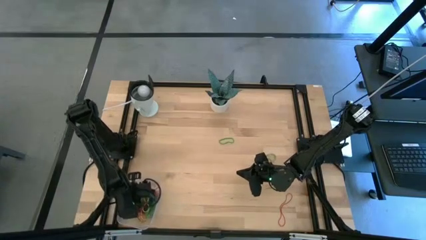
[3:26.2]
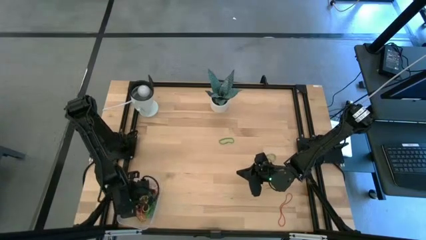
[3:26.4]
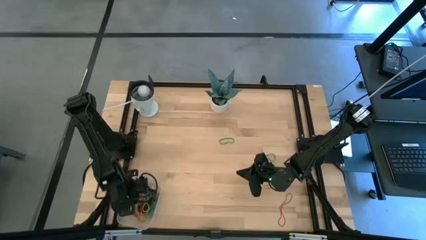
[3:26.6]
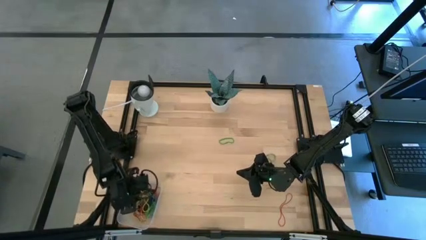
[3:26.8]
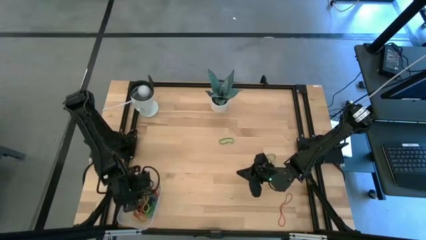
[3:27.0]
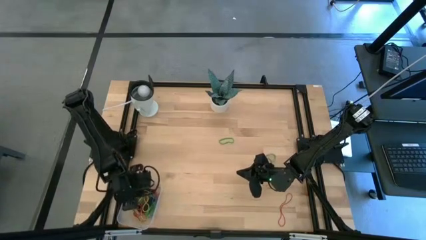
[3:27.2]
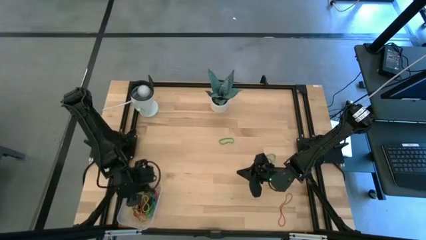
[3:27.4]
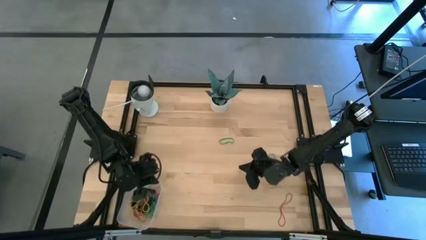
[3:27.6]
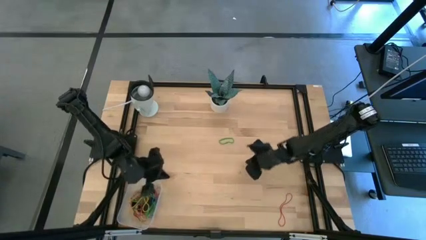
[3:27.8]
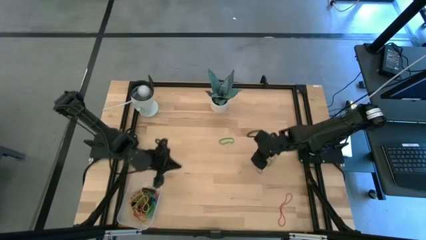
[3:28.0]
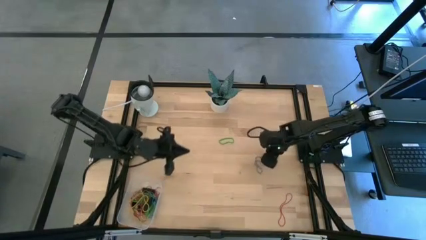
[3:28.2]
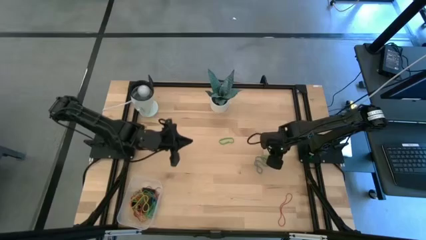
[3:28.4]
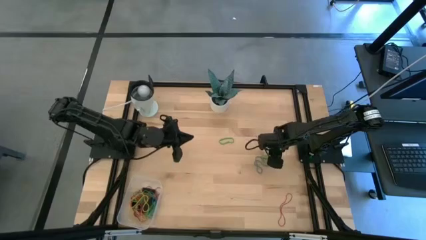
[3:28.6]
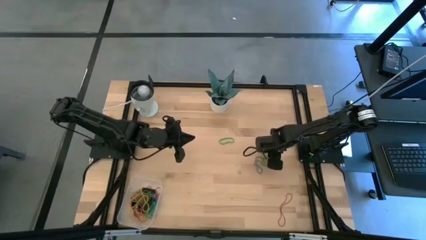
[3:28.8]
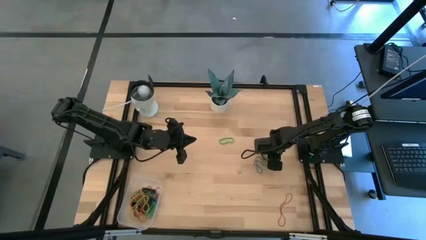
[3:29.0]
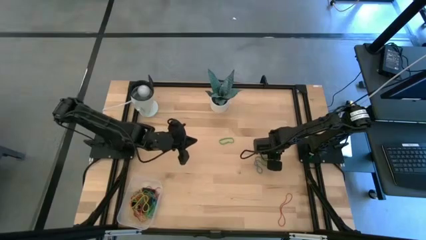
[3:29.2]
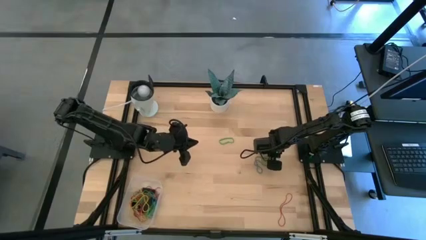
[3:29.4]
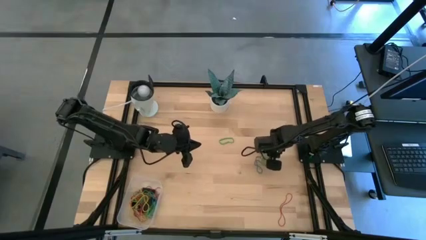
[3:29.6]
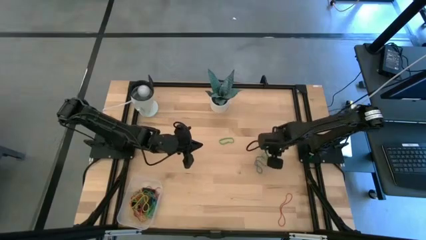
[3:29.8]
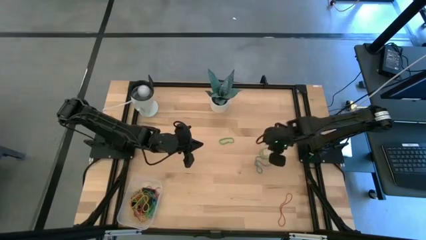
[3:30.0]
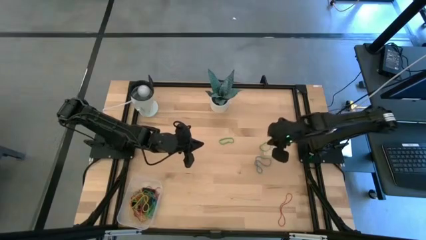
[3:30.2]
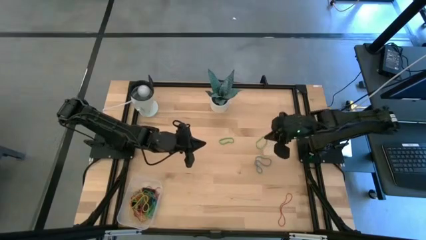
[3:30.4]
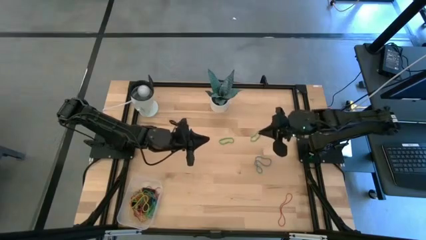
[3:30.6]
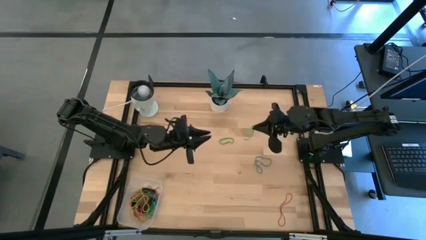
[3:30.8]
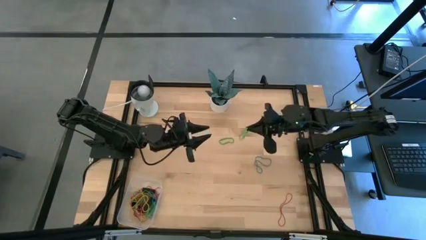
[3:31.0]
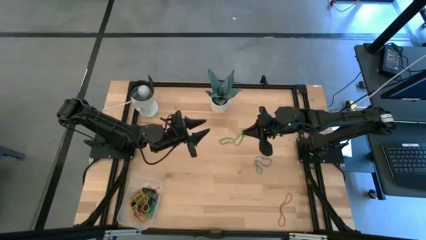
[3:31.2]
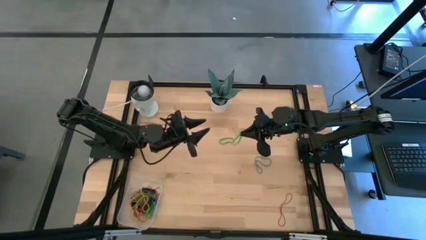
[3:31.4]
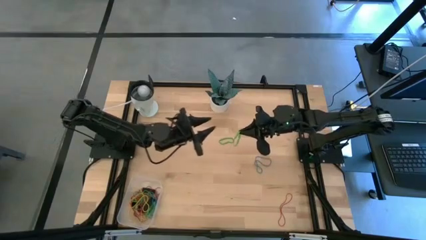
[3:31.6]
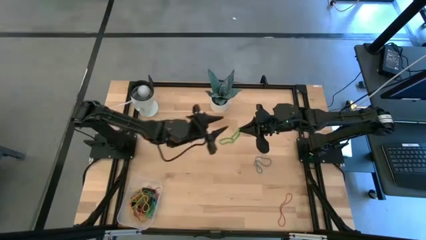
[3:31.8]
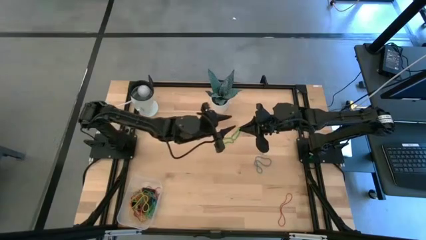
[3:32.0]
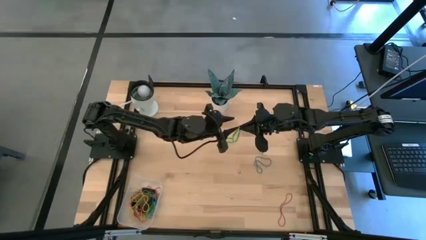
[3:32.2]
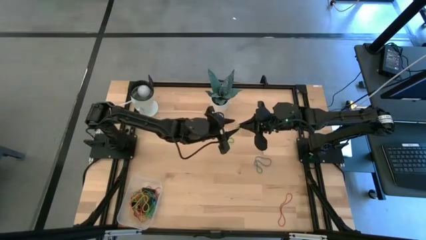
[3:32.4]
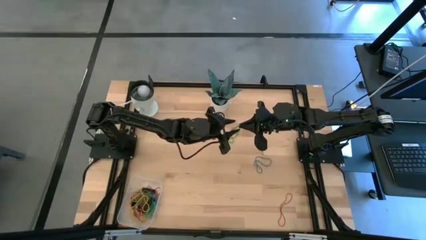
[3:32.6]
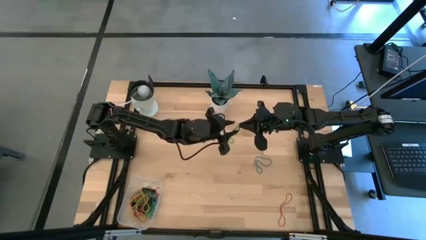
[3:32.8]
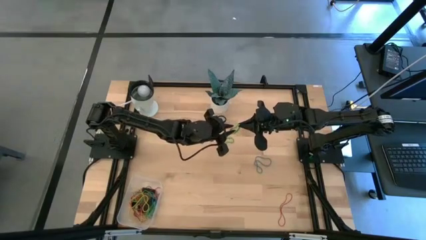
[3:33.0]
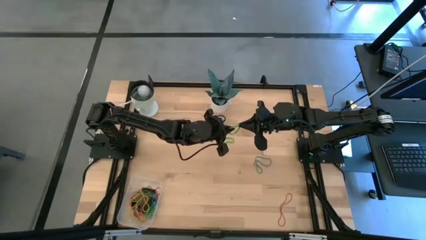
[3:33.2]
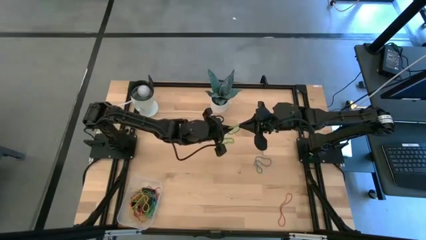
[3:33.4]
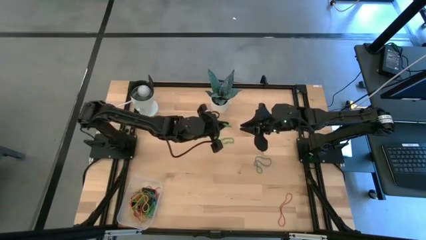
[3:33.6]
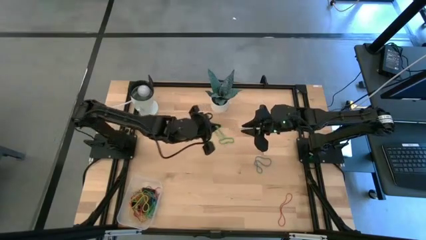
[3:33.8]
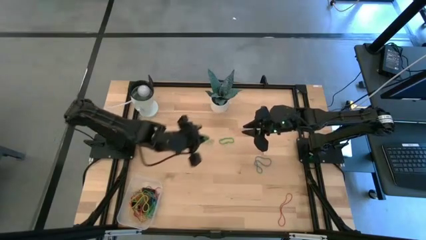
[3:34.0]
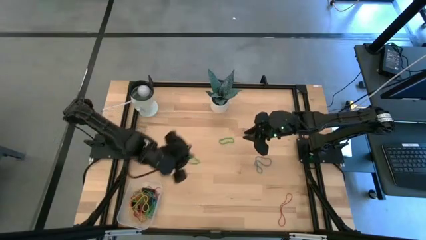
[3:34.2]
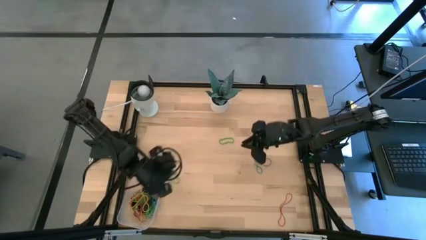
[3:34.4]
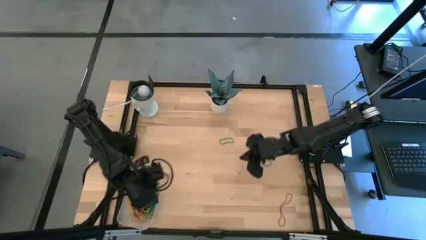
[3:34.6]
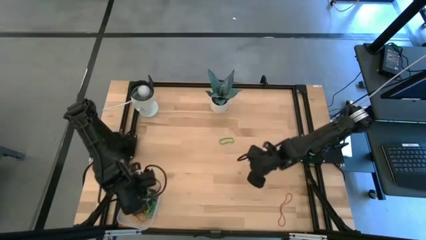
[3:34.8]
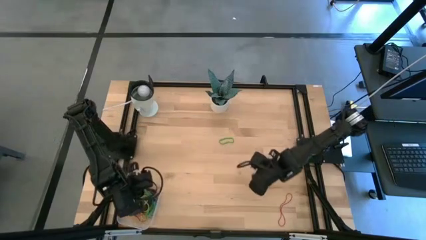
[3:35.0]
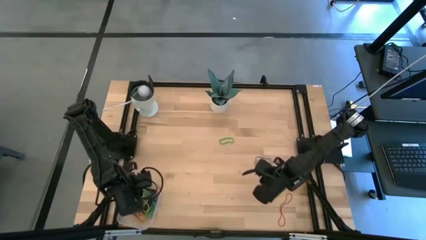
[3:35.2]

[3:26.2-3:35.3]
Task: Pick and place rubber bands into bin
Put the green rubber band into the transparent bin

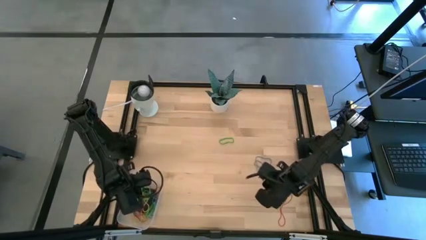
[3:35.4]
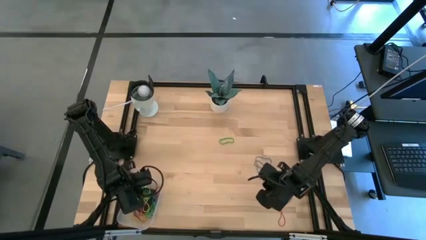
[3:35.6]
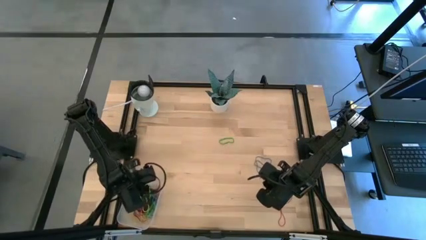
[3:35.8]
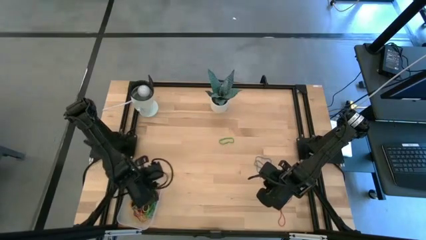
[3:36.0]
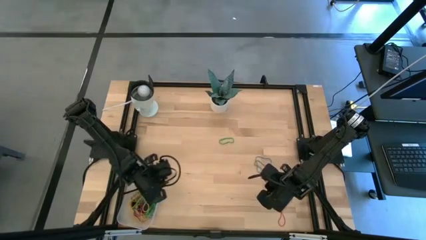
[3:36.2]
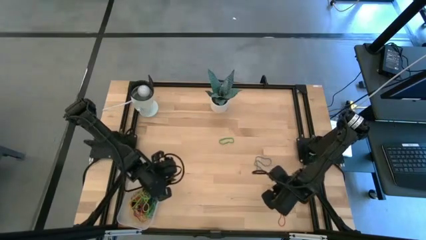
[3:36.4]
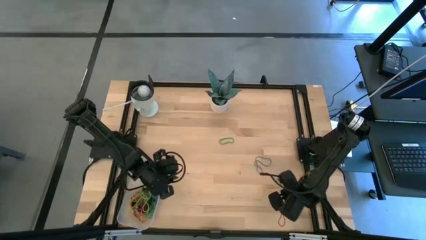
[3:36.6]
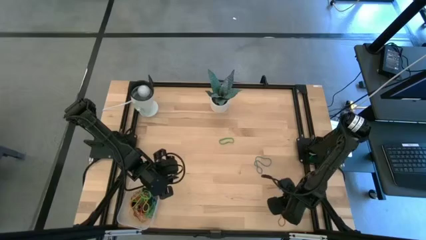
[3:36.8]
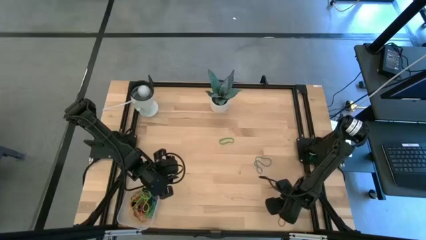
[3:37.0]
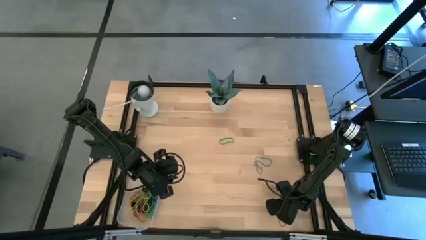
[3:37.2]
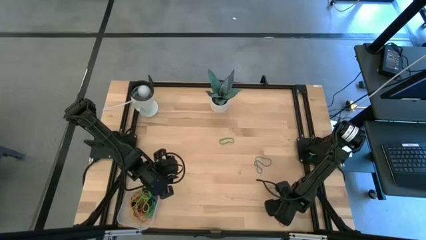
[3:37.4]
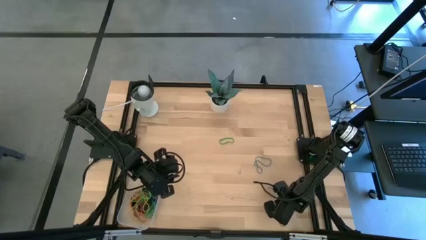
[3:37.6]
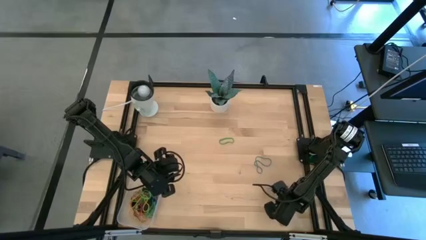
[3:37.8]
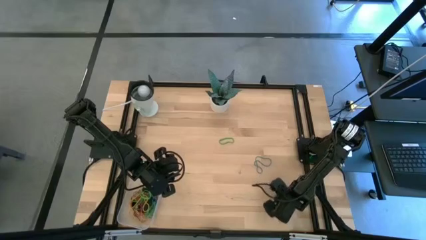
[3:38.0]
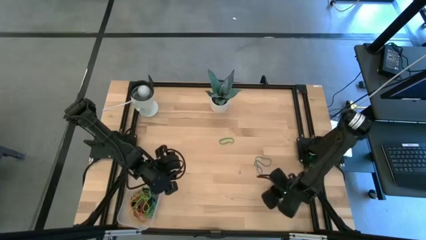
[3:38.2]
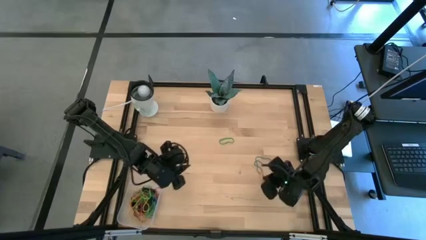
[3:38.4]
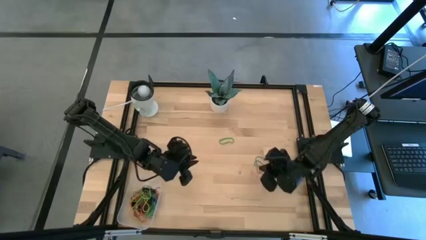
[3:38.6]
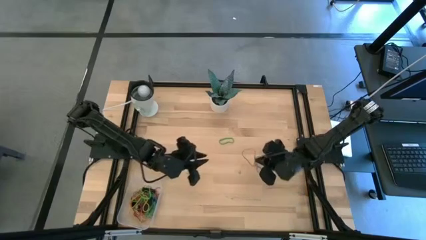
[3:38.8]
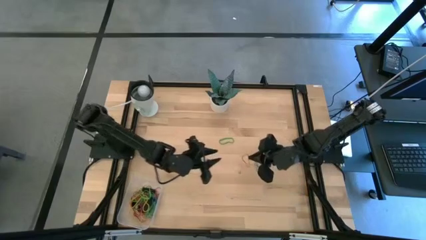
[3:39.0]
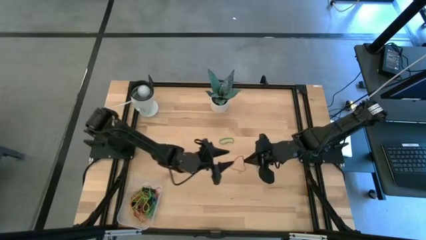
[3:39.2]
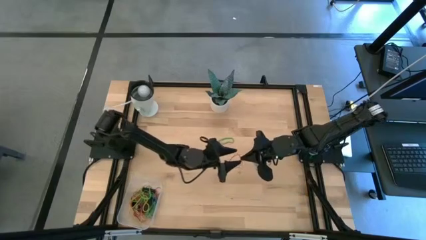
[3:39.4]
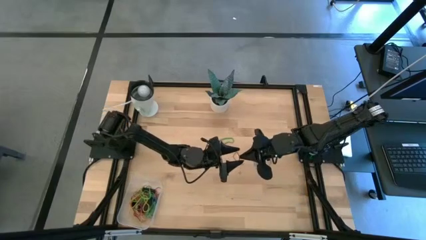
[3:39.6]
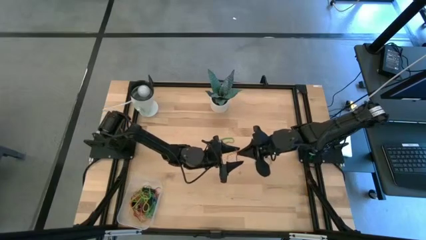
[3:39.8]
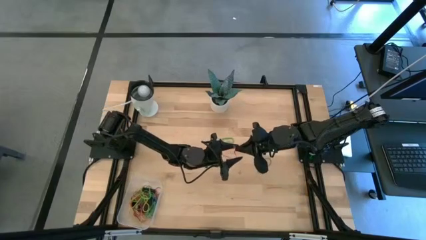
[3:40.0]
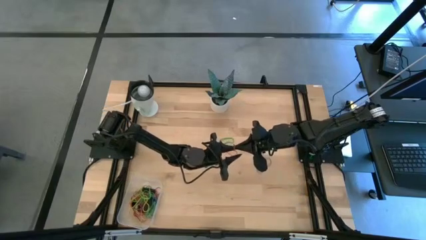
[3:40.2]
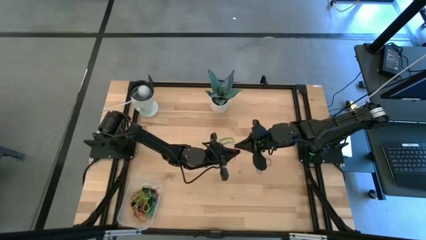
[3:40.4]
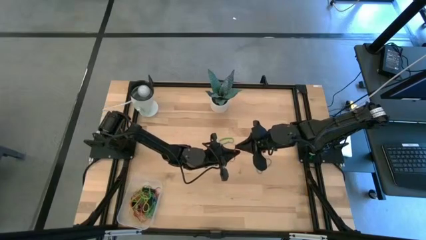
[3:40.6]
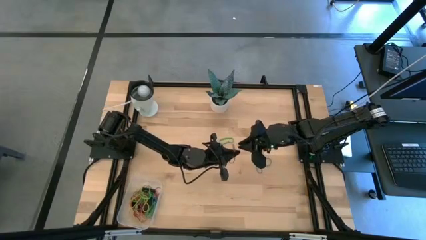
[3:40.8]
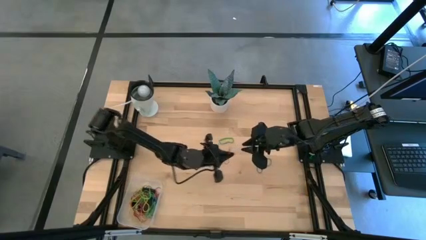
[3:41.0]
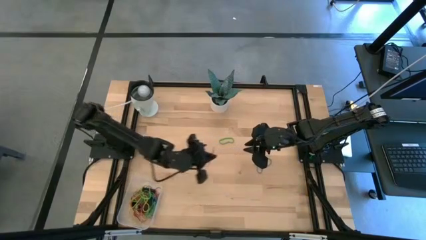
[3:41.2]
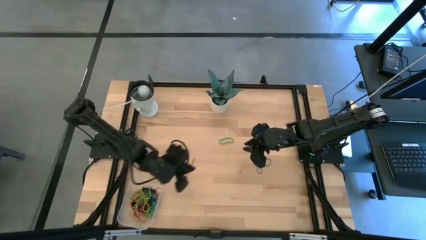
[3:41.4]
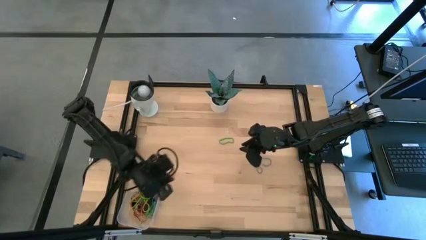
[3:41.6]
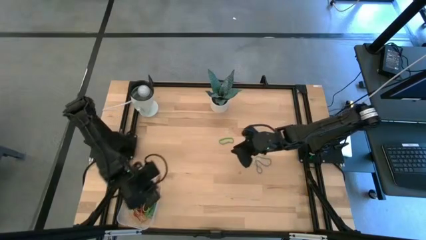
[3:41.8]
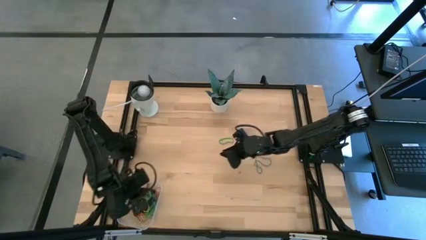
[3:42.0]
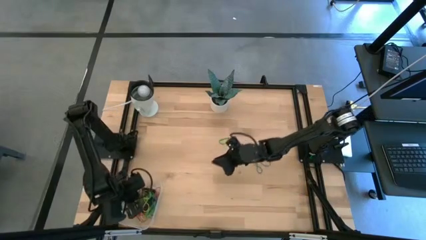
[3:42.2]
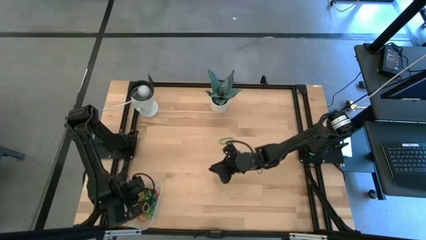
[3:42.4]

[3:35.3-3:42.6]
Put the red rubber band into the transparent bin

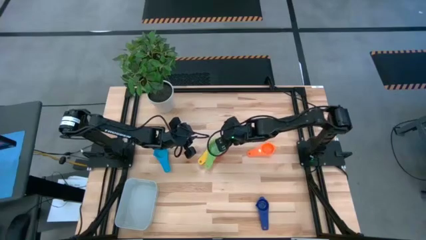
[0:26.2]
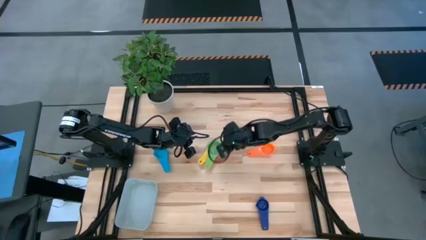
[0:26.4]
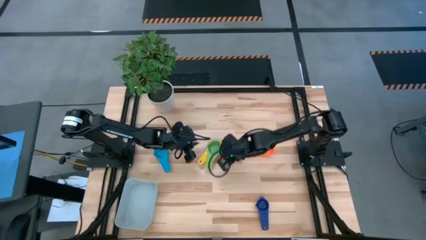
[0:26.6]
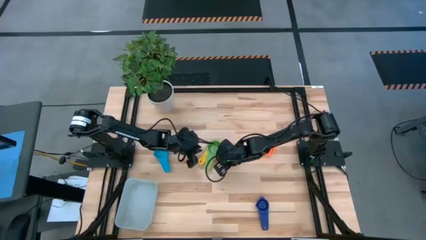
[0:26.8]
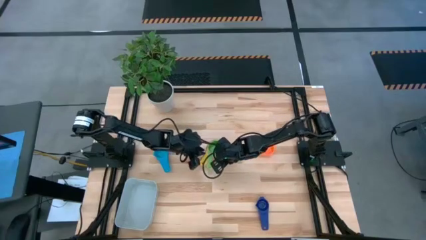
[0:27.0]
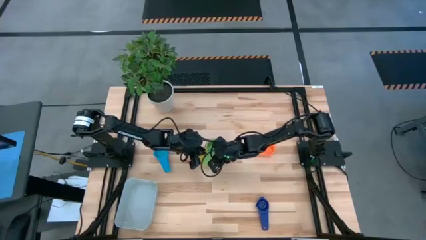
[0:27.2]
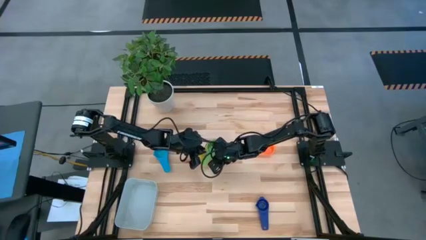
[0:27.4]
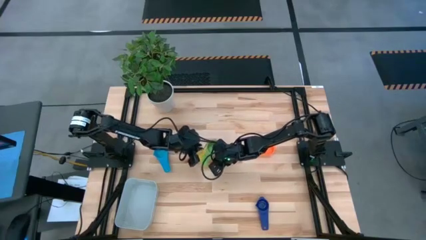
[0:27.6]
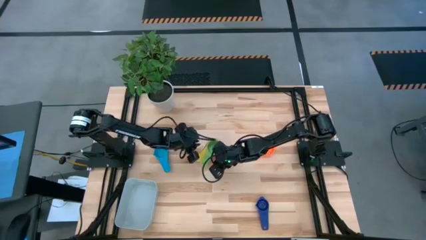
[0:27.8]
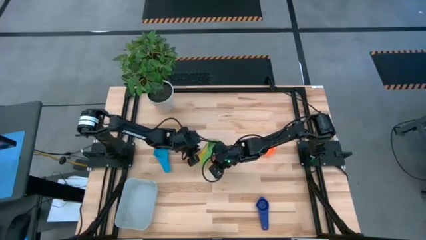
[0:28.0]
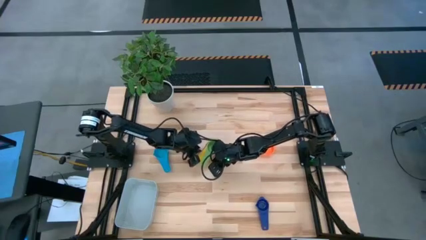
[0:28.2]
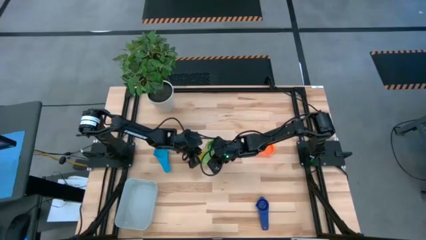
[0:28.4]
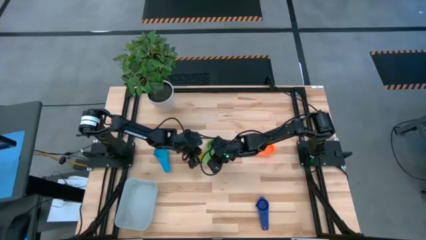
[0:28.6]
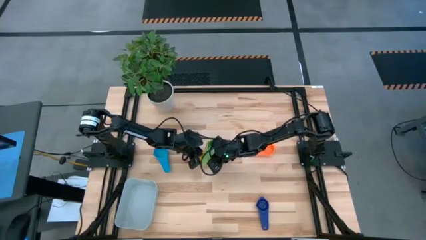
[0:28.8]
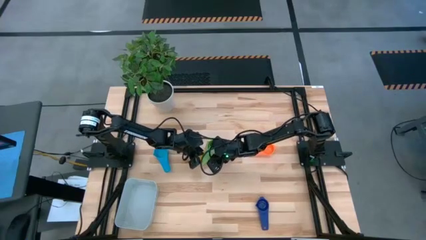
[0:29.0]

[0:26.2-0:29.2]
Task: Nest measuring cups in basket
Adjust the stacked measuring cups
